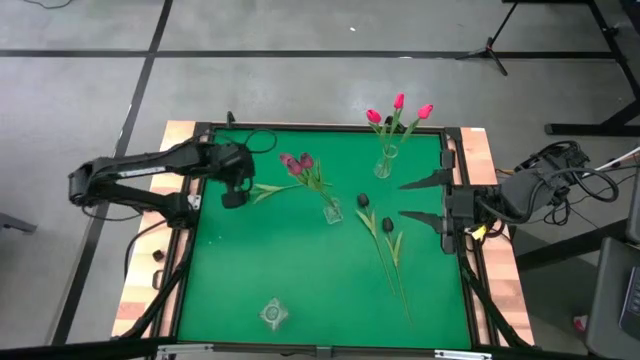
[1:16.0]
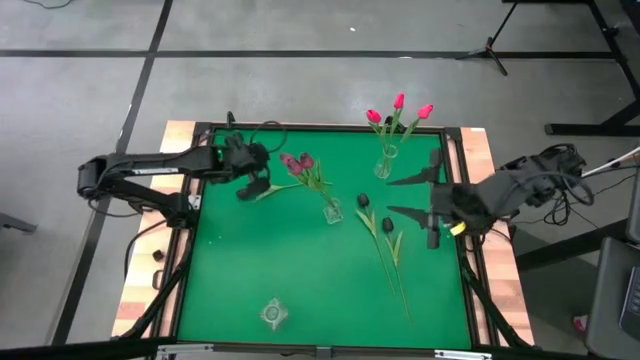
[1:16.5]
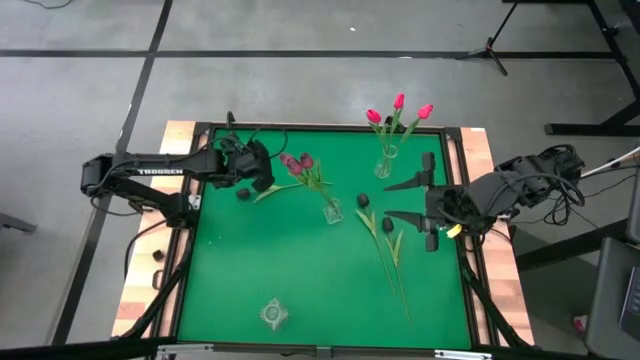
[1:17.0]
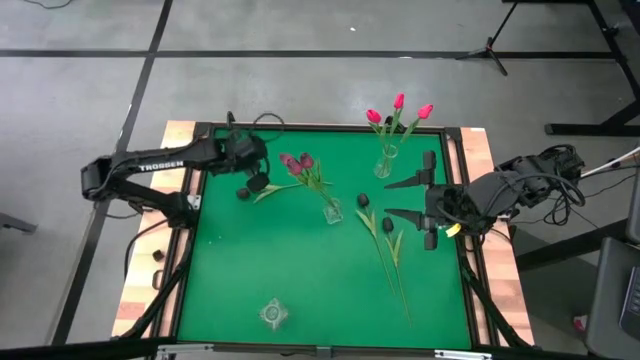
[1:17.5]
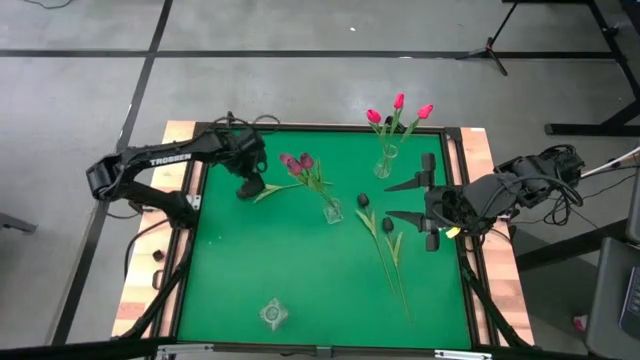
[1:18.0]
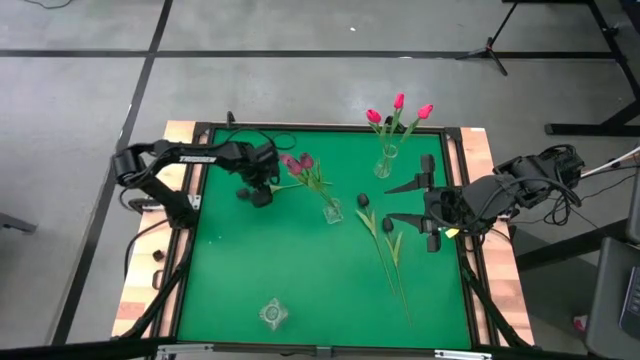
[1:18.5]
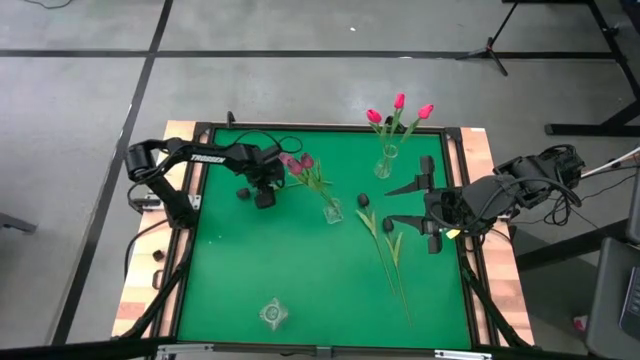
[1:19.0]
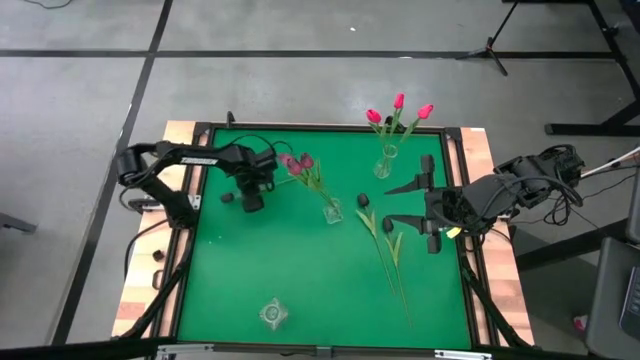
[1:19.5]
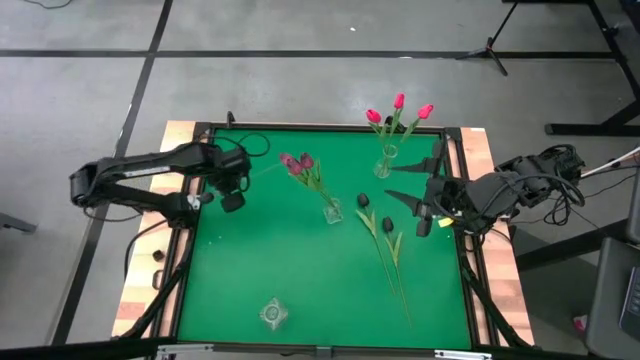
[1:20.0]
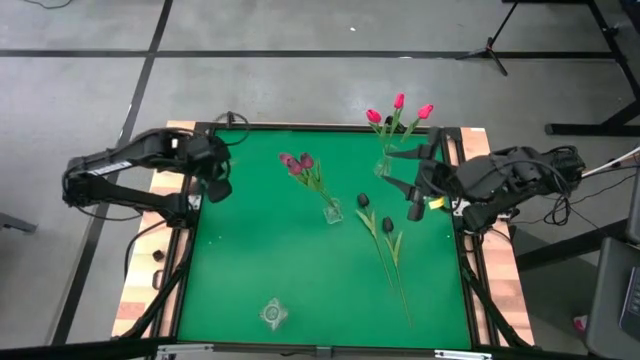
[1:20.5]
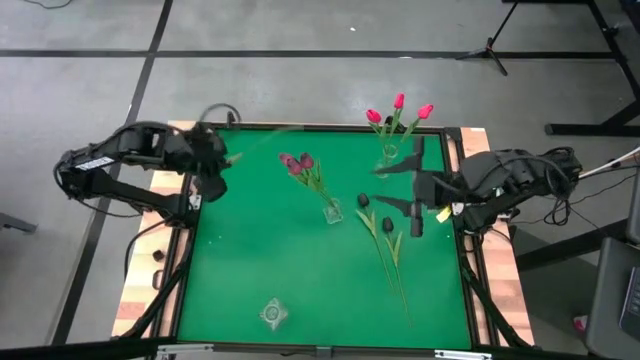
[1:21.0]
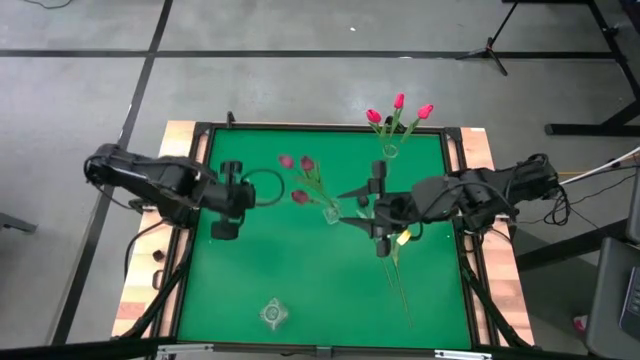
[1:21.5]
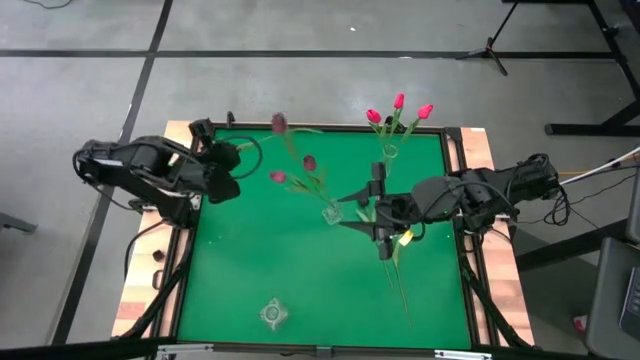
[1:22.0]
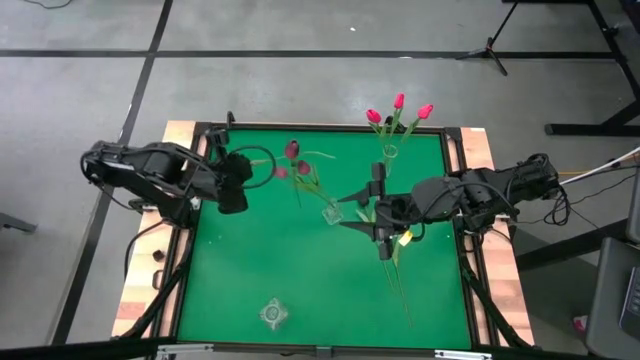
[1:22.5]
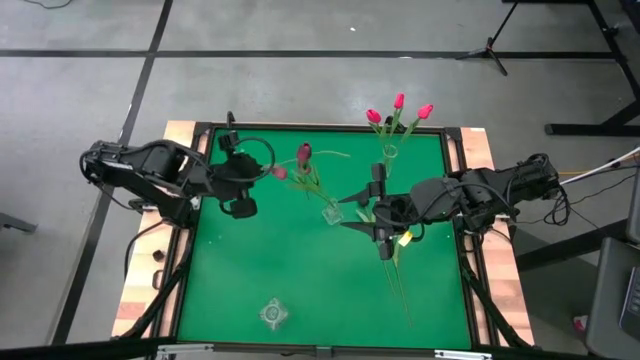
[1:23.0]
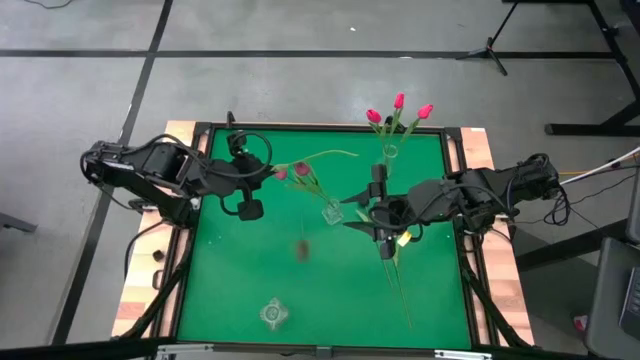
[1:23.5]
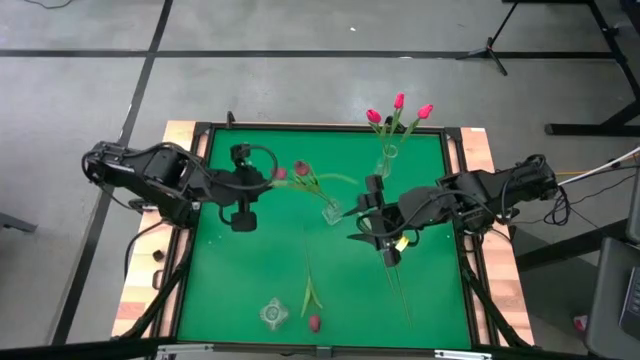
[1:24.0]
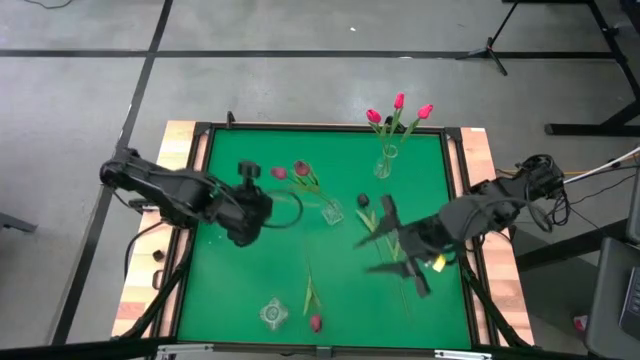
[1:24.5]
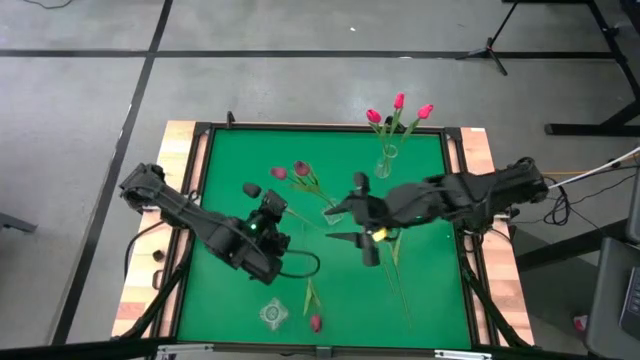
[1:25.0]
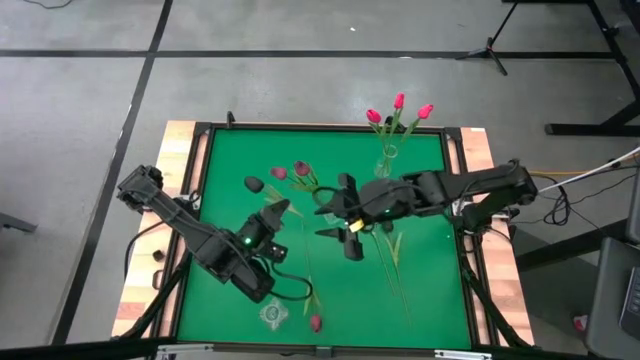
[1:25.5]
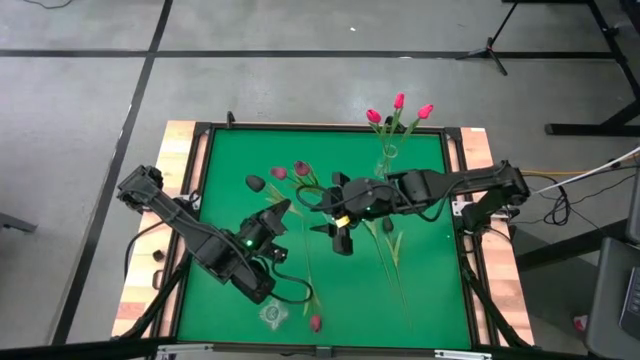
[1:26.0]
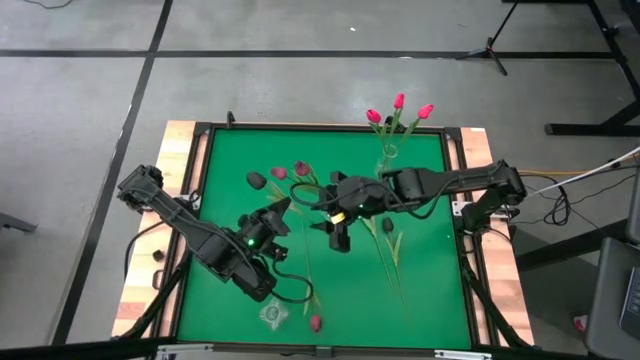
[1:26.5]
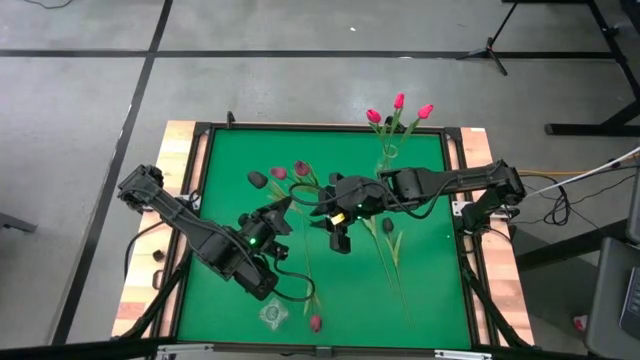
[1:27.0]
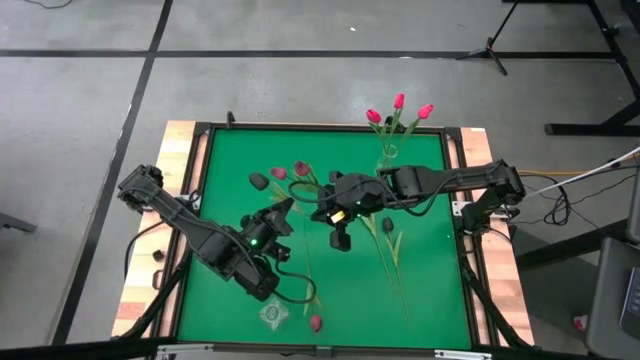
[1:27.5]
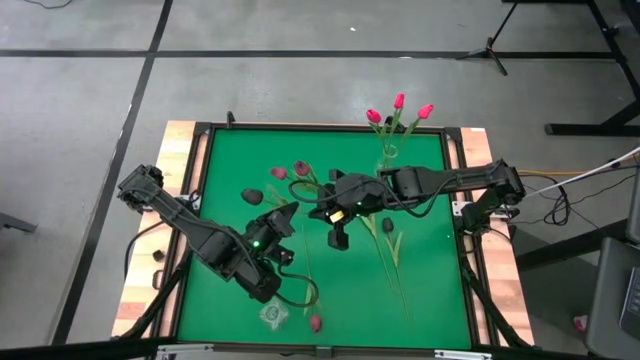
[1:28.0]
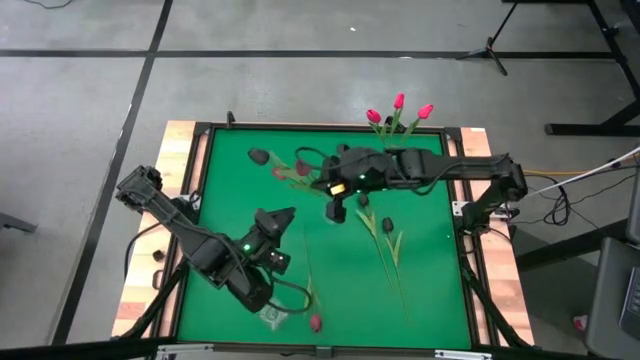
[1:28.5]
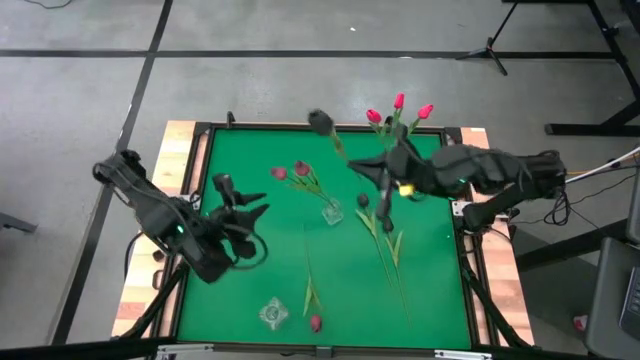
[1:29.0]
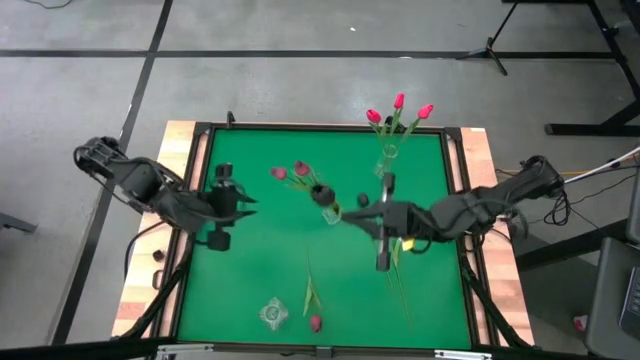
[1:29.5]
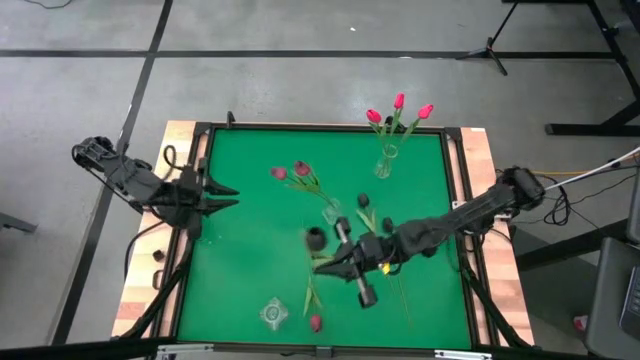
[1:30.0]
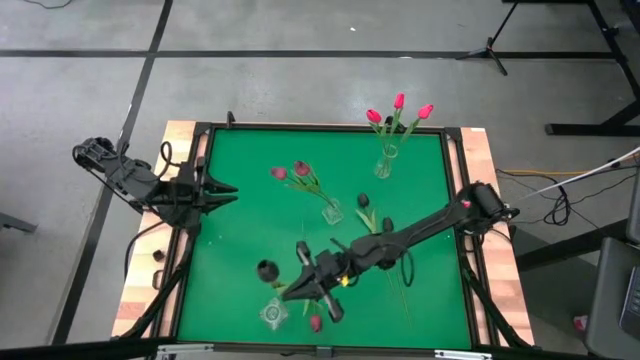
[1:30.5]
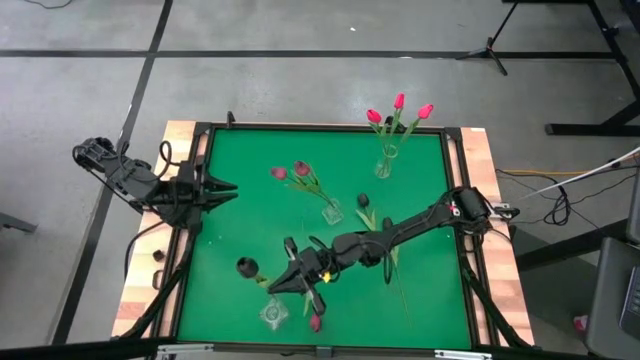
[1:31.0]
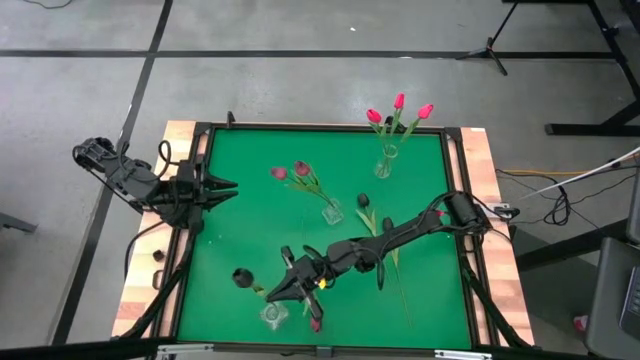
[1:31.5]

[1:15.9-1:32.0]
Task: Sort flowers into vase by color
Put the top left black tulip into the bottom transparent vase

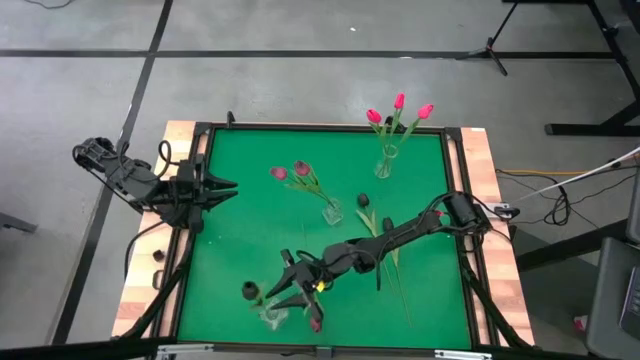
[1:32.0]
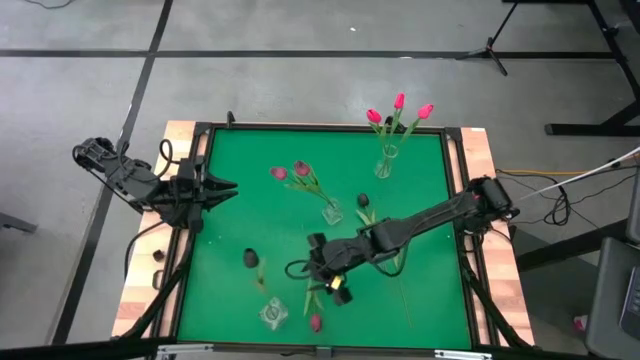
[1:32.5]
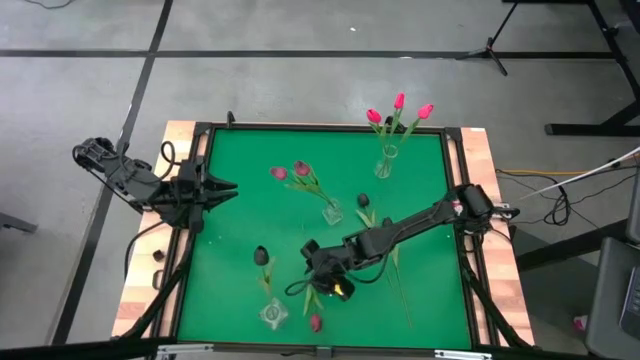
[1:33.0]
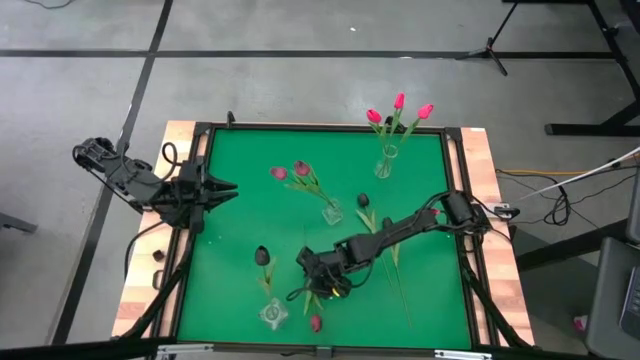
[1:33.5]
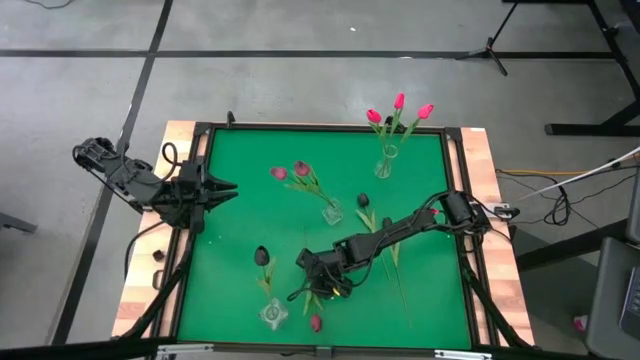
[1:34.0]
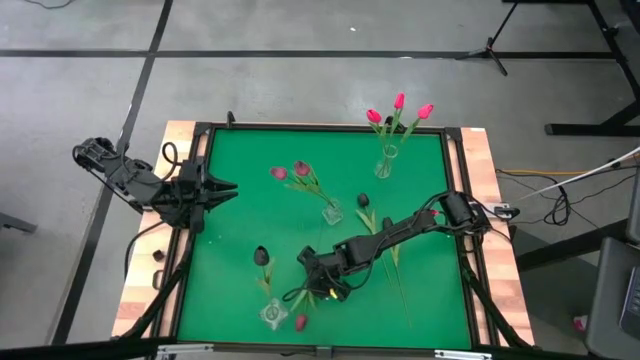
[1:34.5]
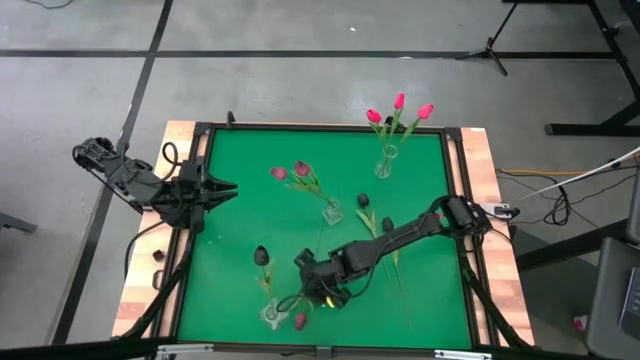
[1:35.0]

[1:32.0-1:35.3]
Put the dark red tulip into the center transparent vase

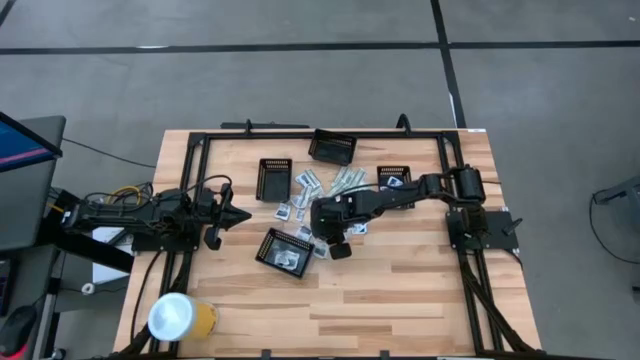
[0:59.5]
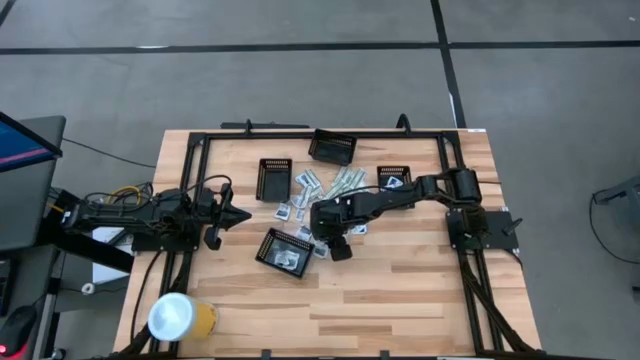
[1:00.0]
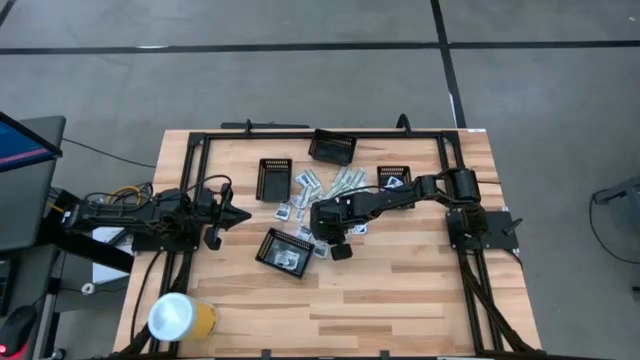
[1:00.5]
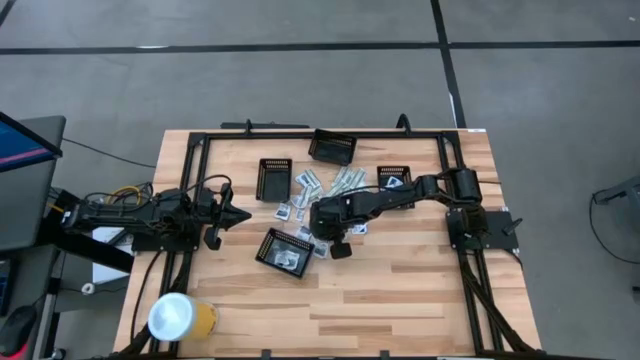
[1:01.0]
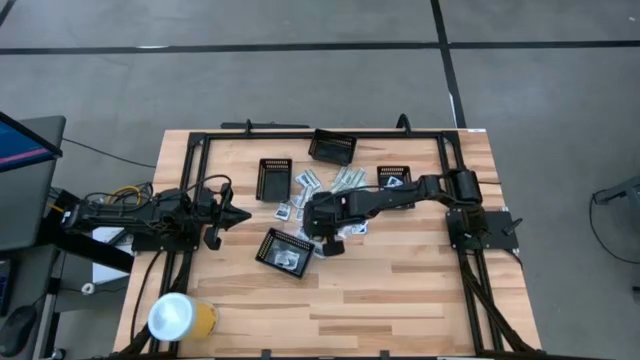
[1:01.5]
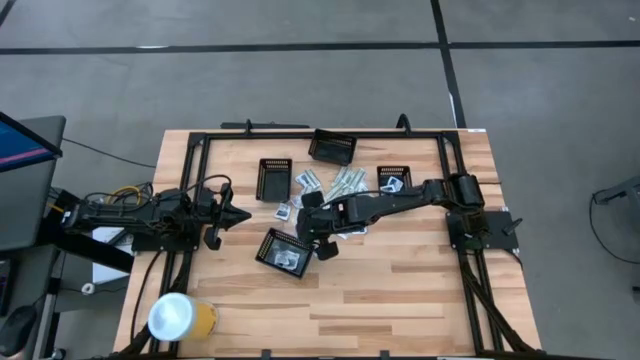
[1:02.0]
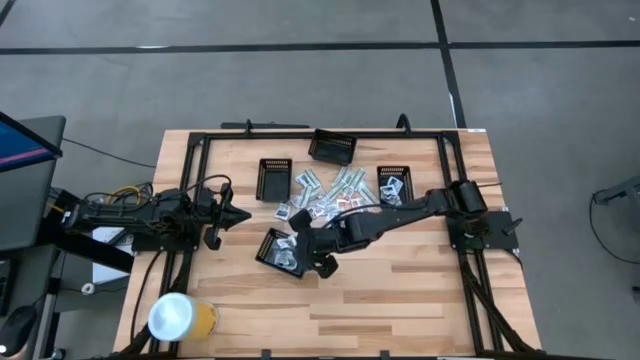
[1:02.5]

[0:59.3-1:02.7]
Task: Pick & Place First Aid Supplies
Put the white towelette pack into the bottom black bin
